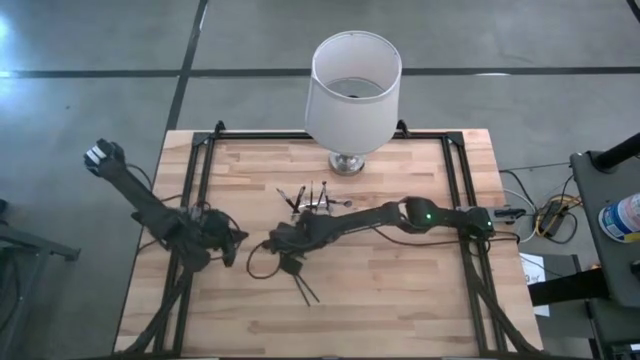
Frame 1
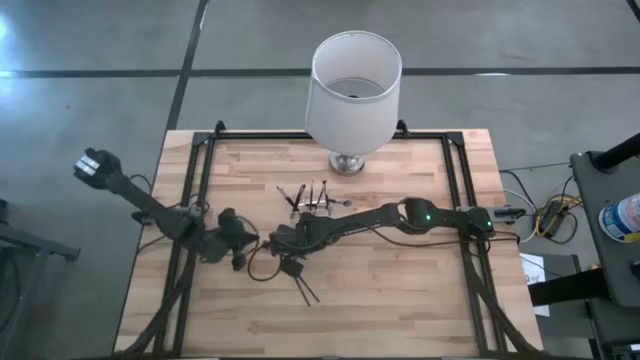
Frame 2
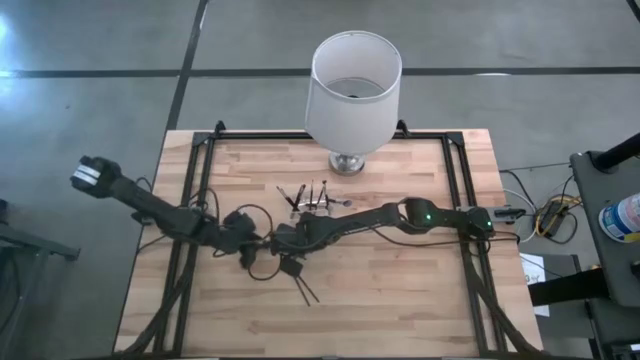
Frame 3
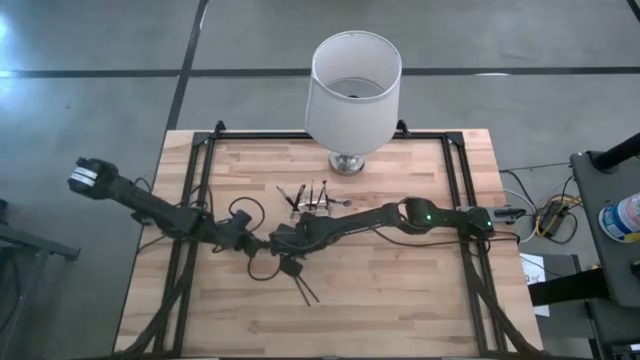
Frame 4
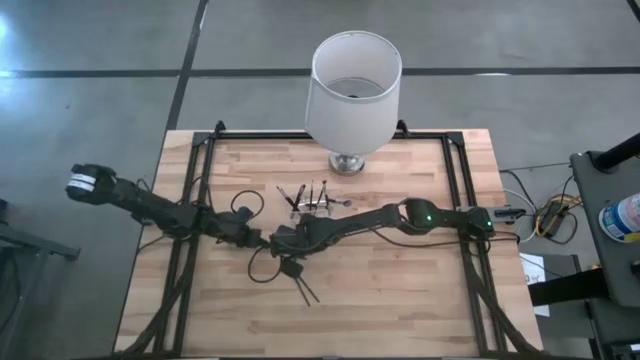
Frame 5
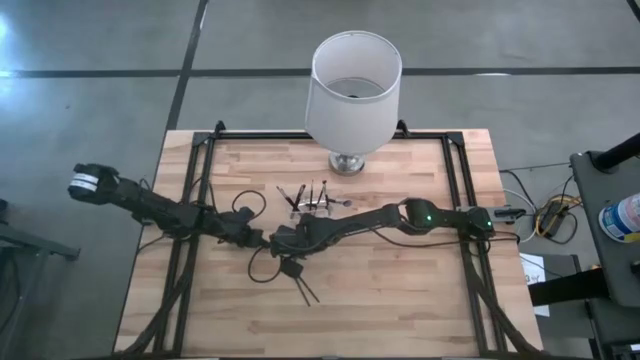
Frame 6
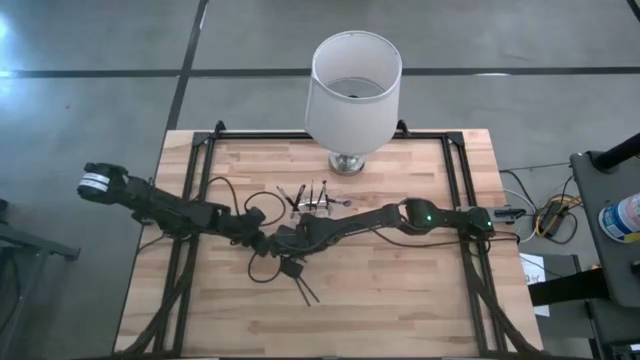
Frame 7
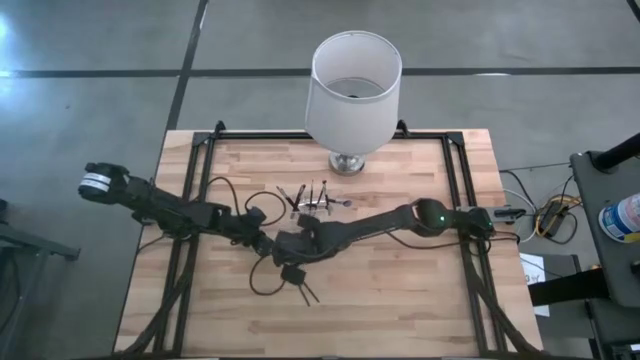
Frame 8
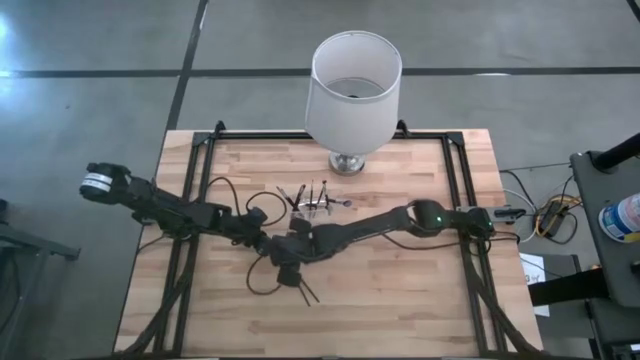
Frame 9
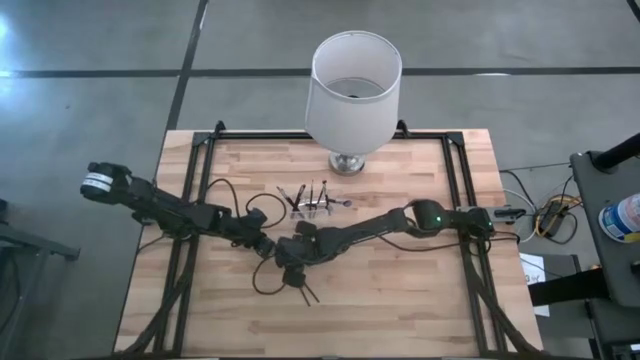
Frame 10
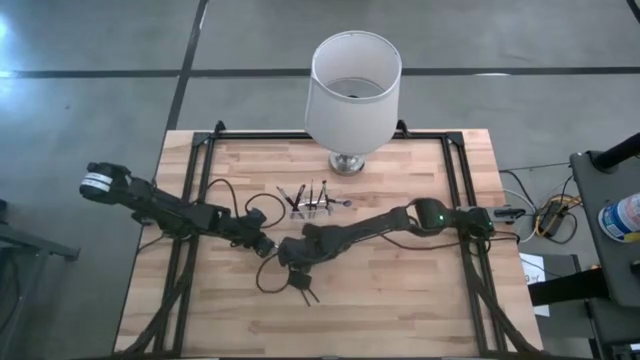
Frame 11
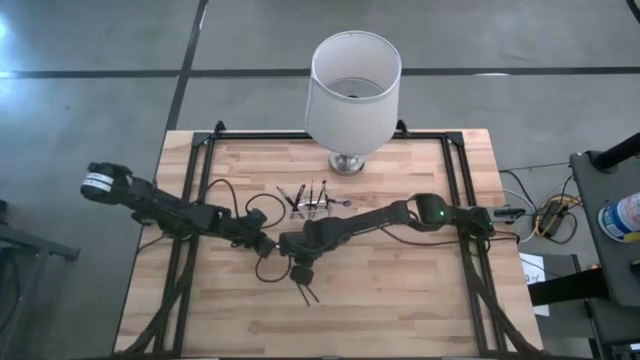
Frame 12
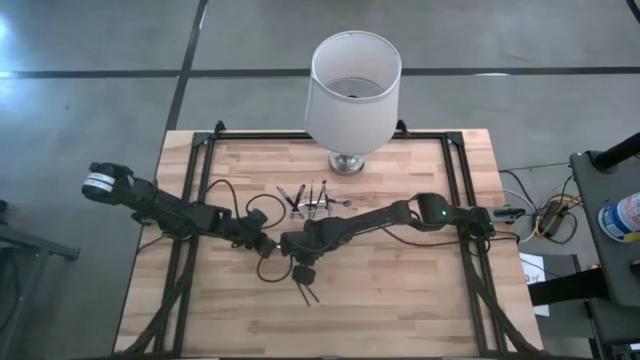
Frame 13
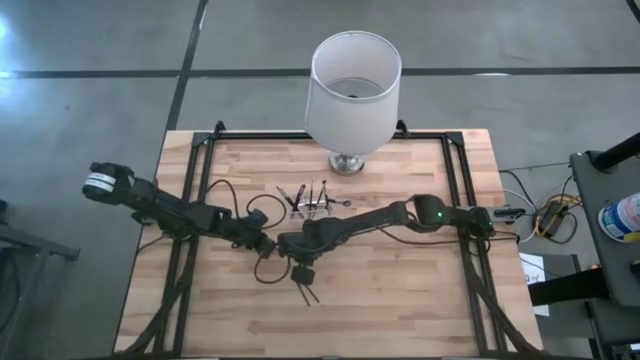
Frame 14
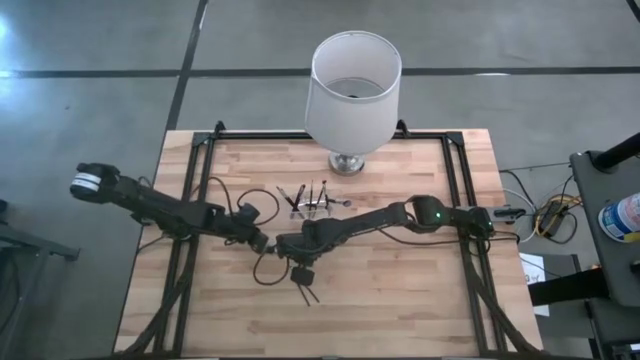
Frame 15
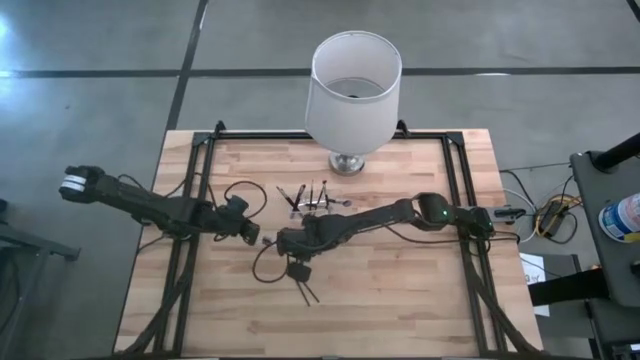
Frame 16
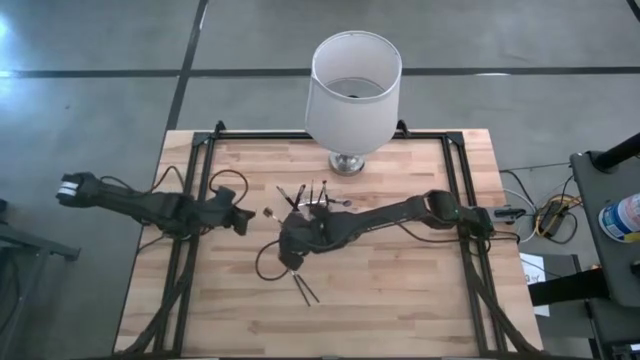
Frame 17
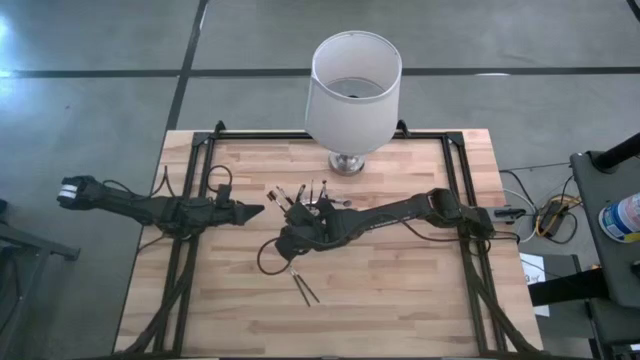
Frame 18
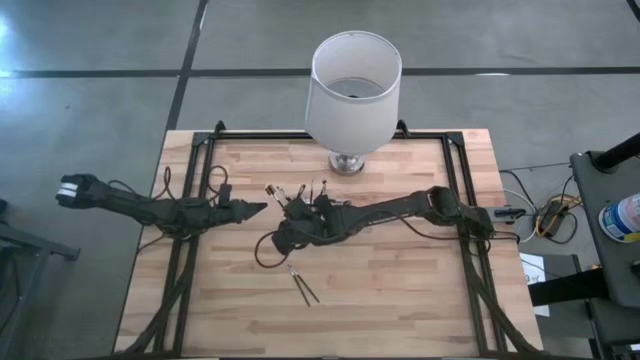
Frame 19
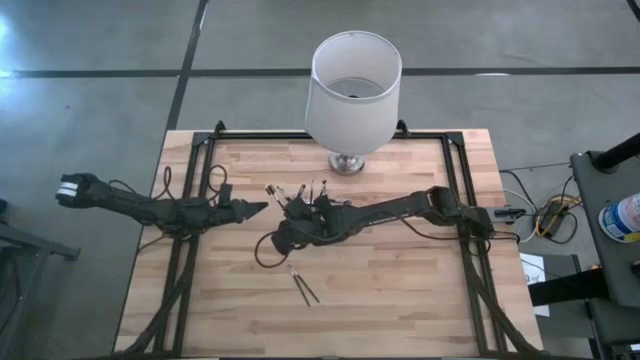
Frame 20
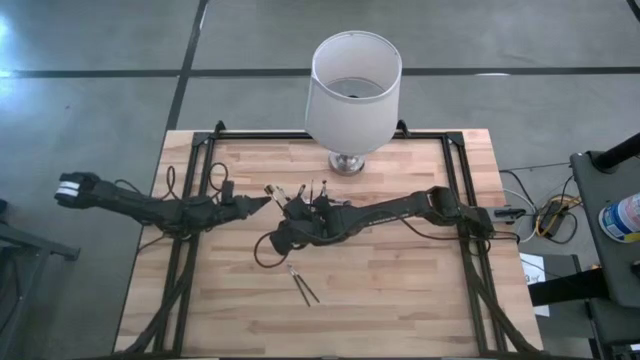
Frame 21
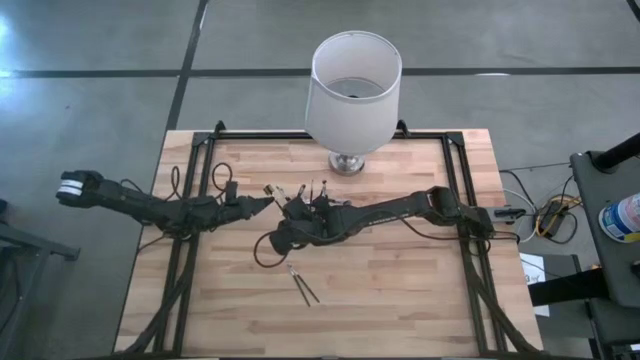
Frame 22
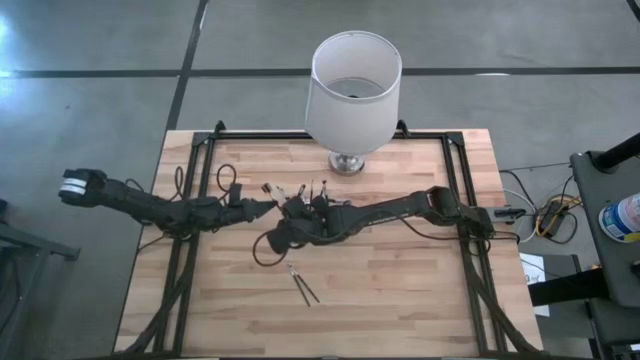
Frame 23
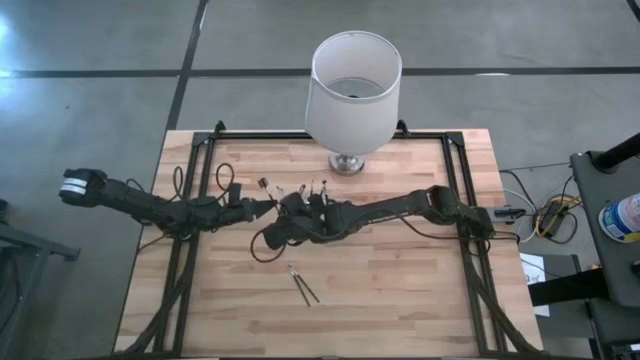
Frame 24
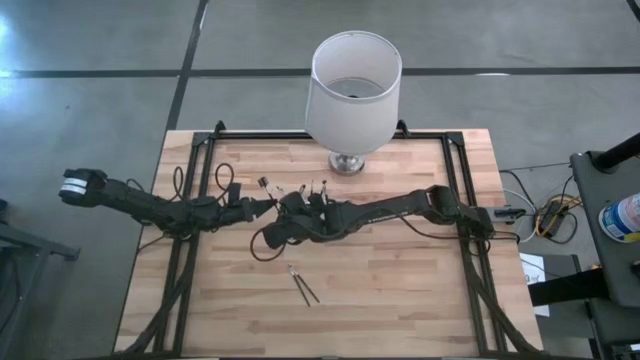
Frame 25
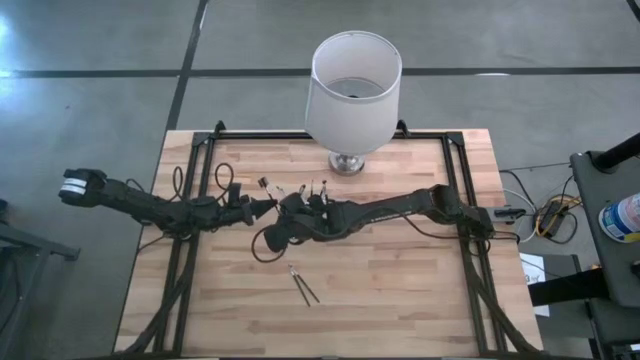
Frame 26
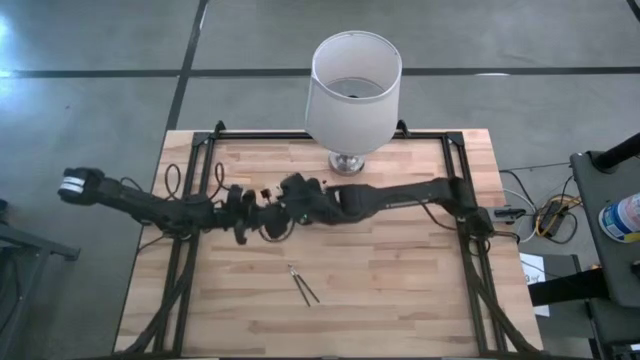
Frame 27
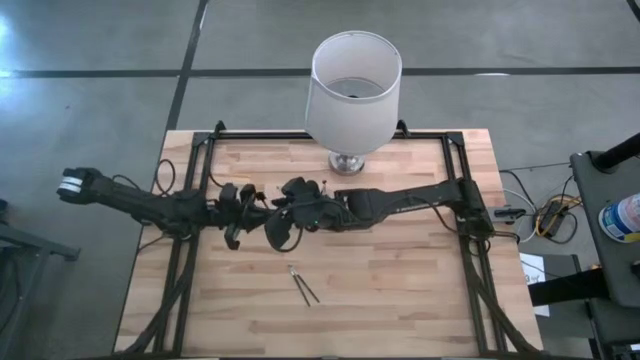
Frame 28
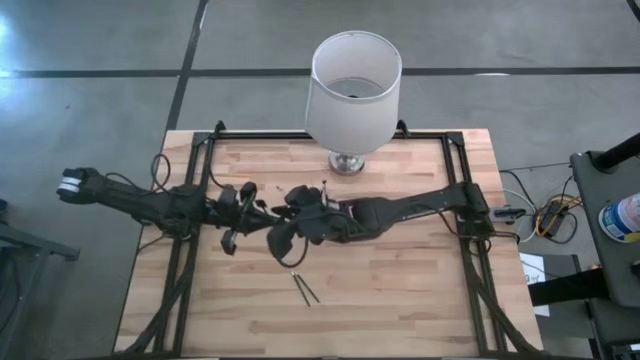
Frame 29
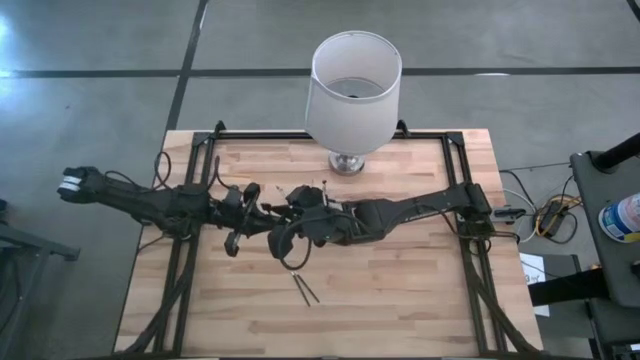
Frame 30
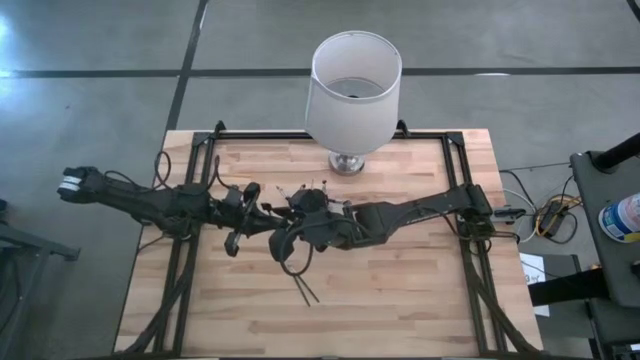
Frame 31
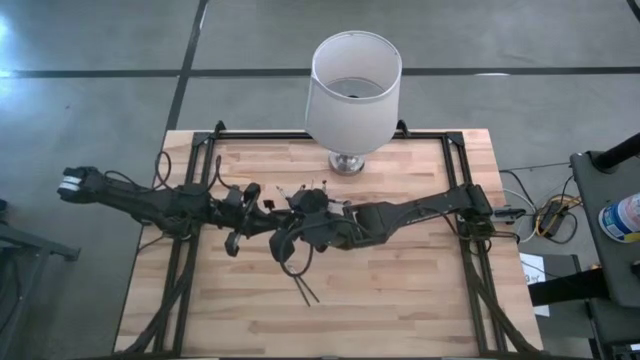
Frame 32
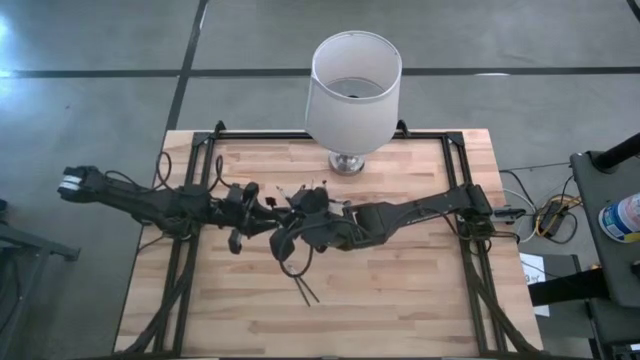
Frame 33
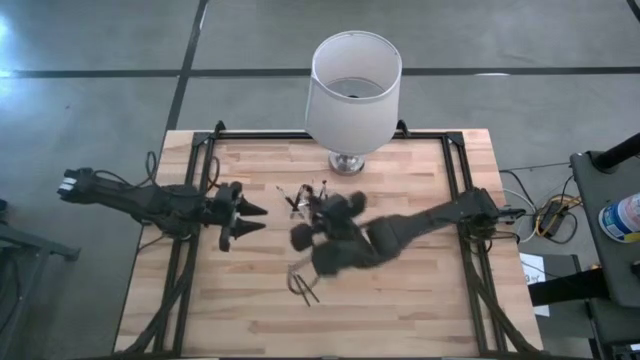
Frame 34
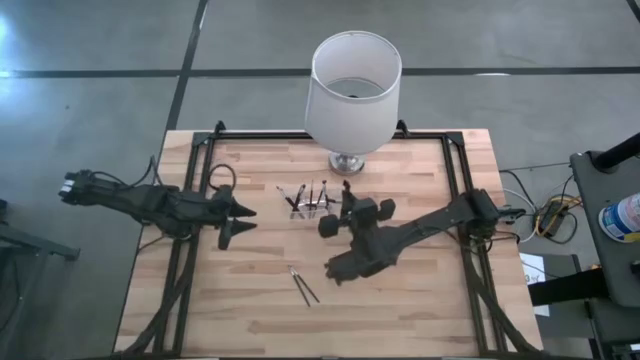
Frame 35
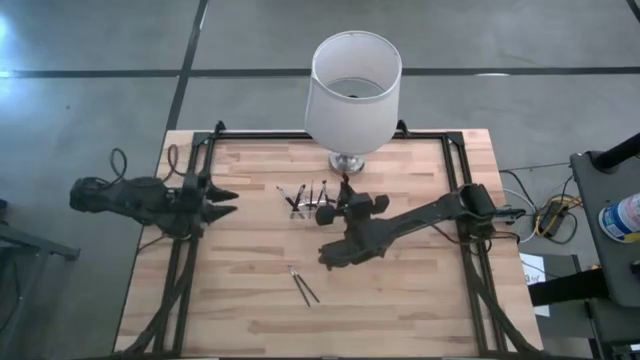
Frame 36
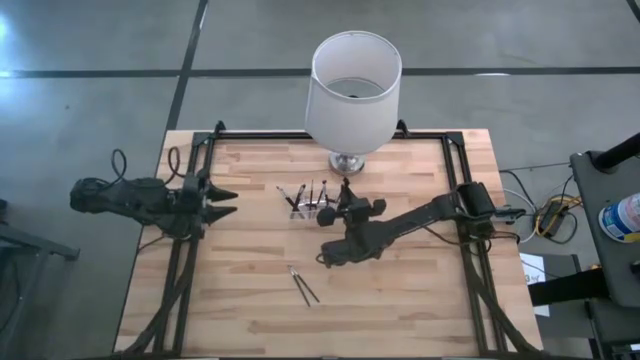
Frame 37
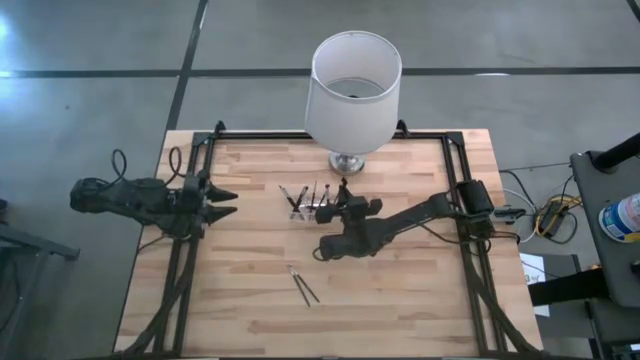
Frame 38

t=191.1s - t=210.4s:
Task: Put items in baskets/containers
Put the brow brush into the transparent organizer

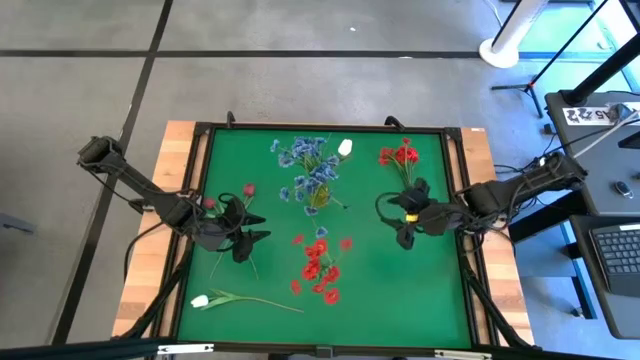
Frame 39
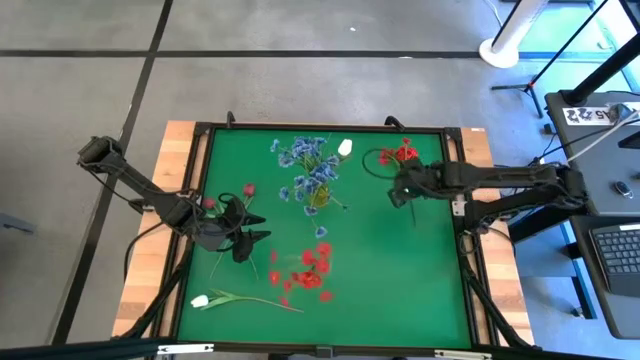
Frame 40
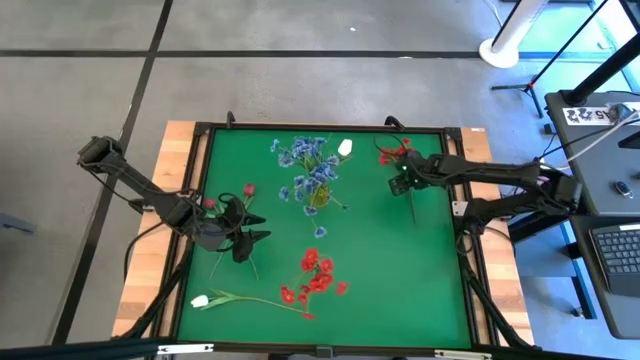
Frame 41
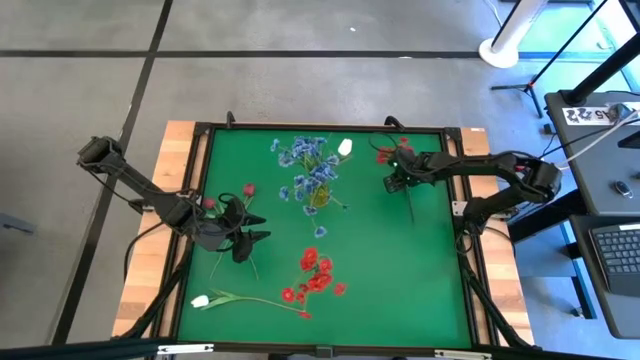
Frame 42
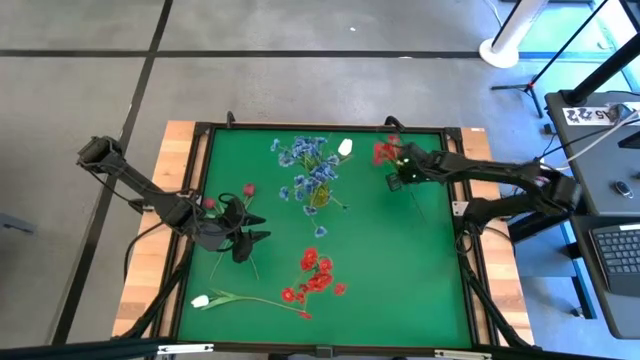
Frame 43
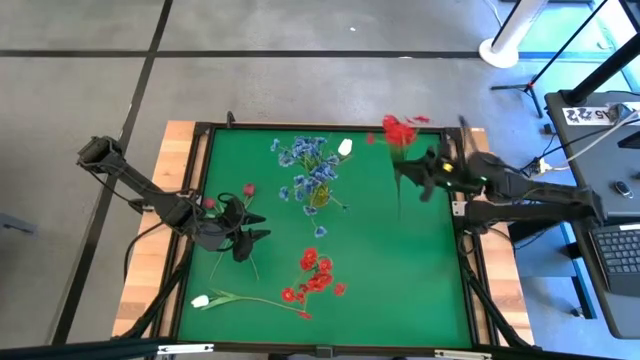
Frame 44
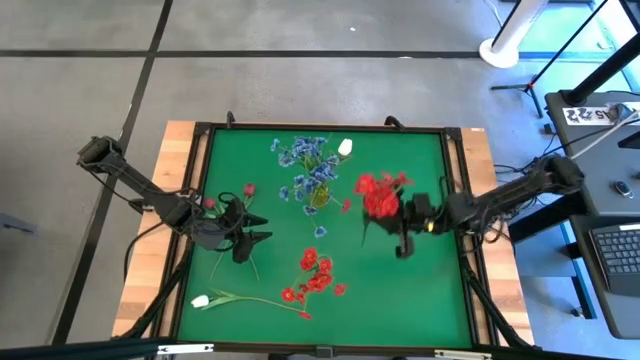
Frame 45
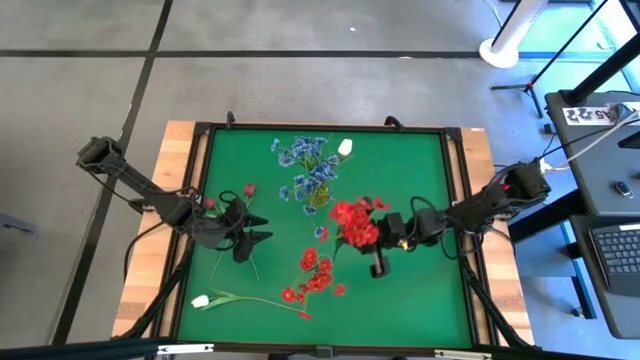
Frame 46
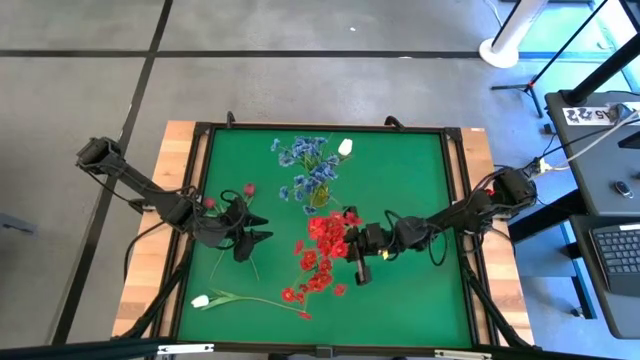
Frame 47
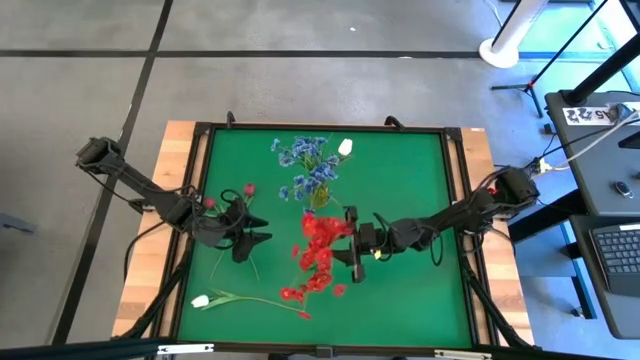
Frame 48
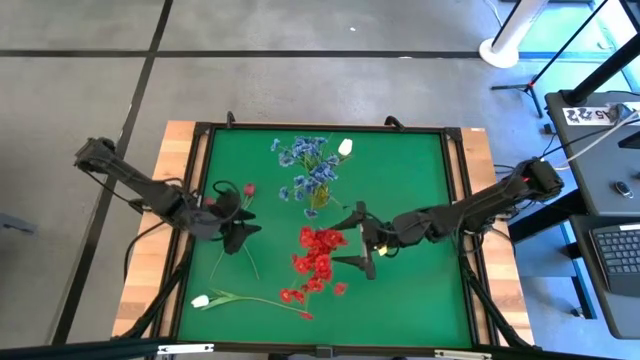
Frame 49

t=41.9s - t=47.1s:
Task: Sort flowers into vase by color
Put the red flowers into the transparent flower vase
